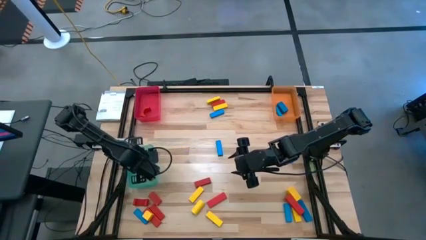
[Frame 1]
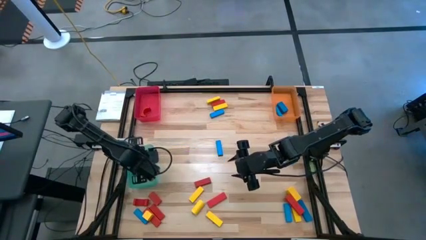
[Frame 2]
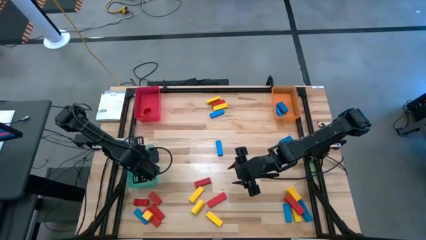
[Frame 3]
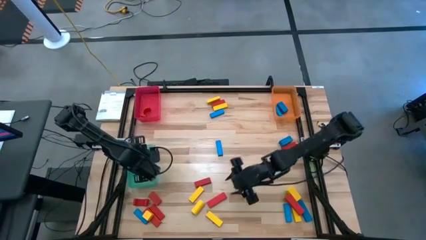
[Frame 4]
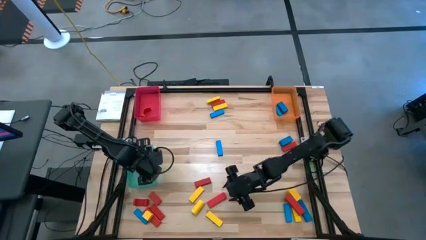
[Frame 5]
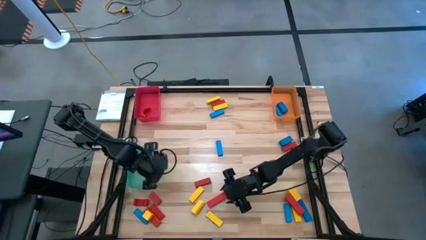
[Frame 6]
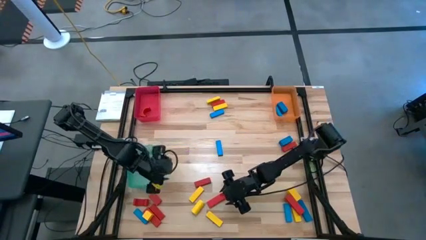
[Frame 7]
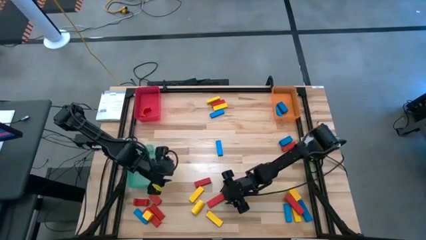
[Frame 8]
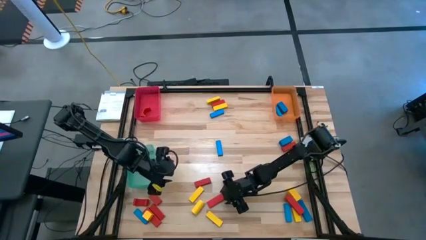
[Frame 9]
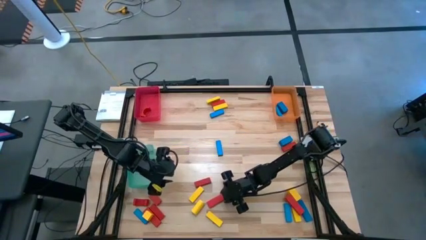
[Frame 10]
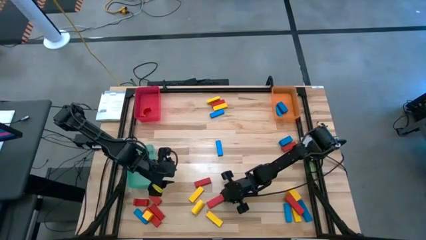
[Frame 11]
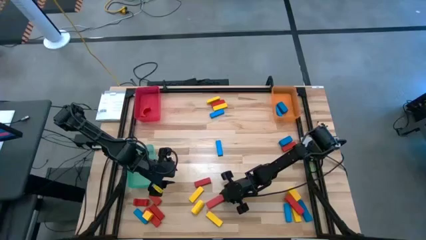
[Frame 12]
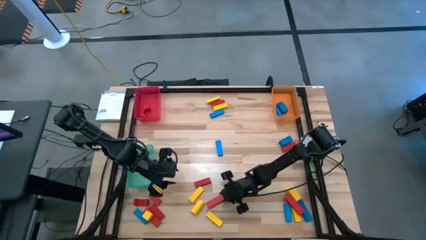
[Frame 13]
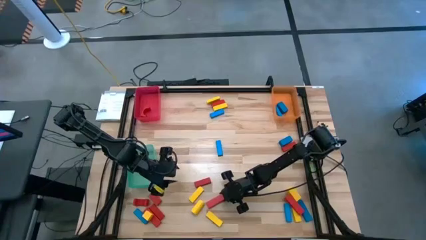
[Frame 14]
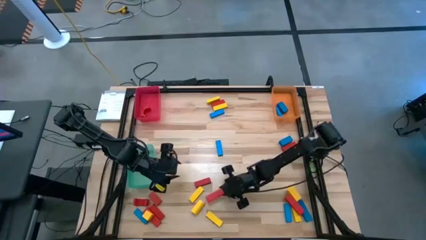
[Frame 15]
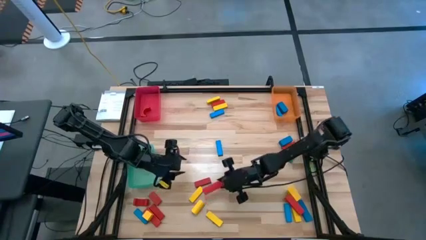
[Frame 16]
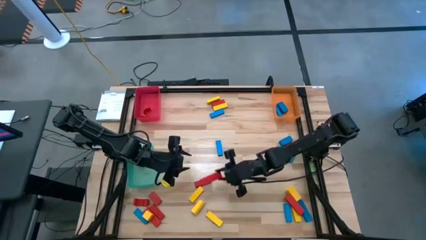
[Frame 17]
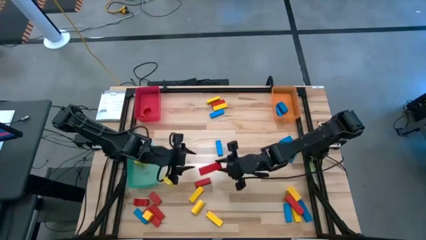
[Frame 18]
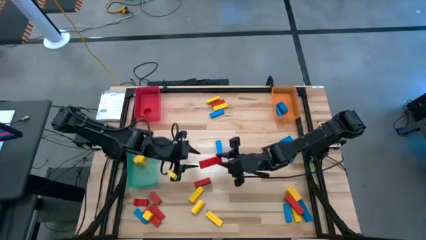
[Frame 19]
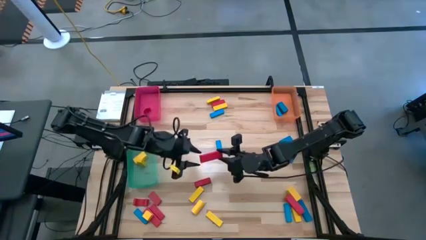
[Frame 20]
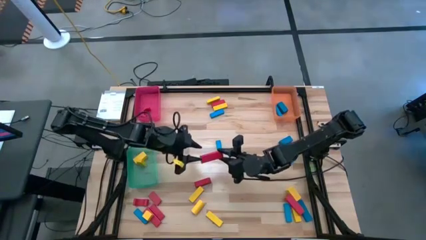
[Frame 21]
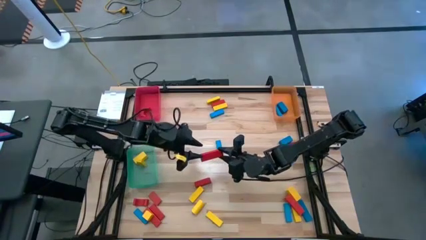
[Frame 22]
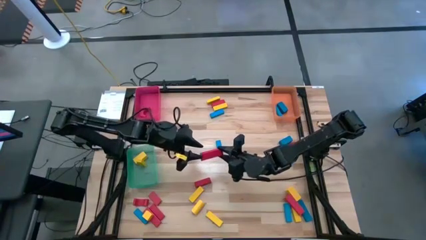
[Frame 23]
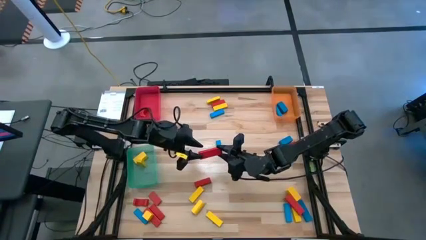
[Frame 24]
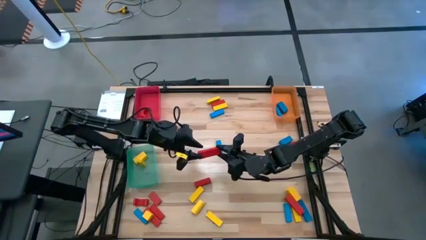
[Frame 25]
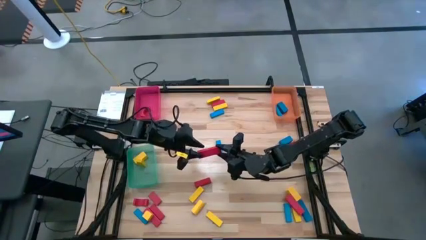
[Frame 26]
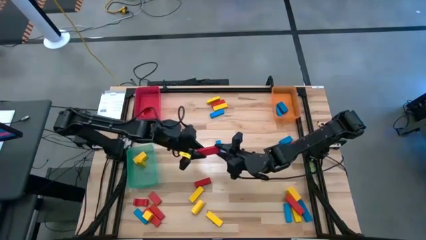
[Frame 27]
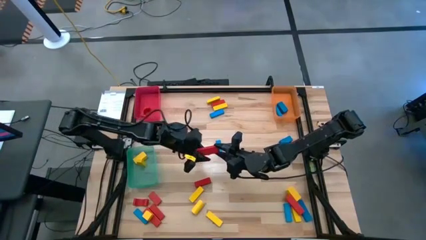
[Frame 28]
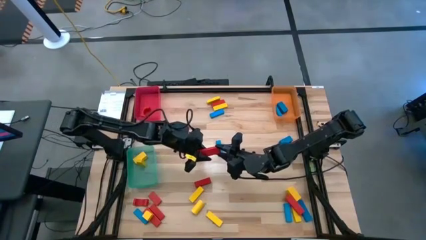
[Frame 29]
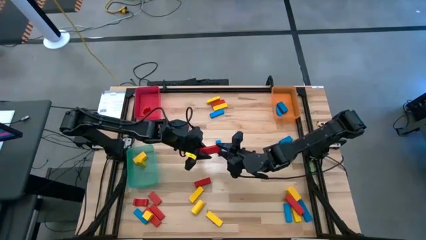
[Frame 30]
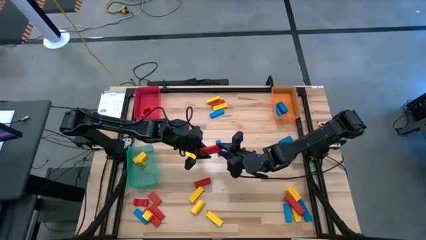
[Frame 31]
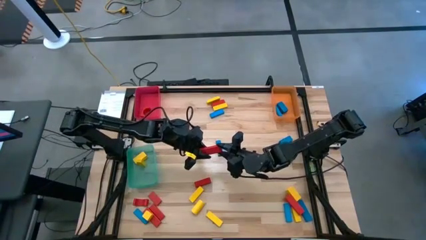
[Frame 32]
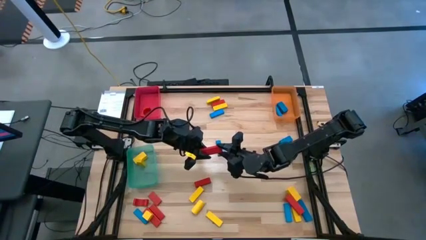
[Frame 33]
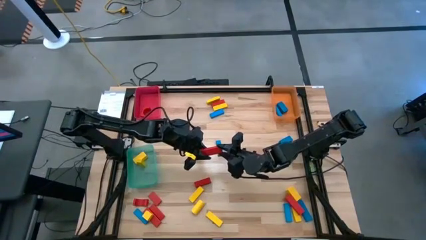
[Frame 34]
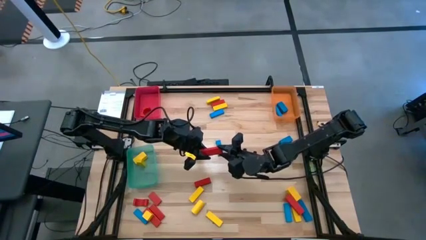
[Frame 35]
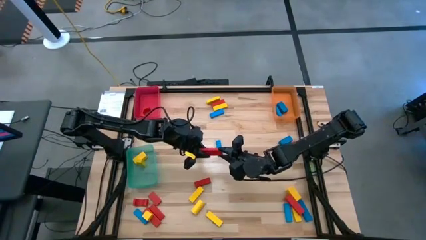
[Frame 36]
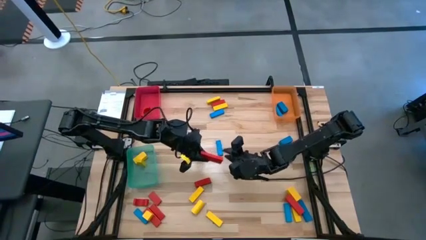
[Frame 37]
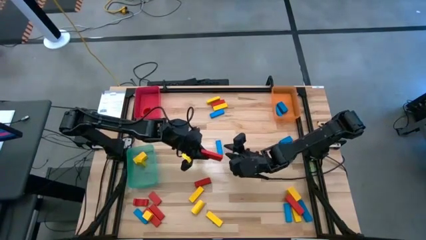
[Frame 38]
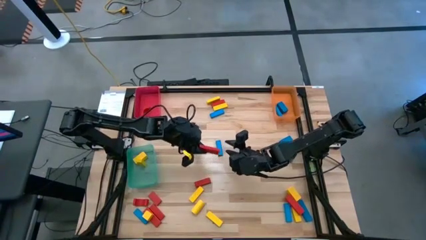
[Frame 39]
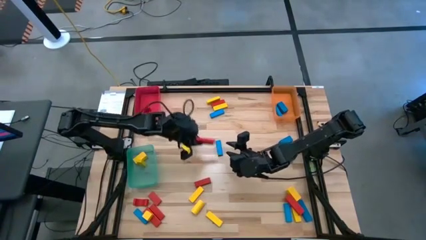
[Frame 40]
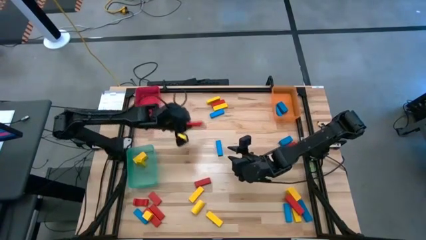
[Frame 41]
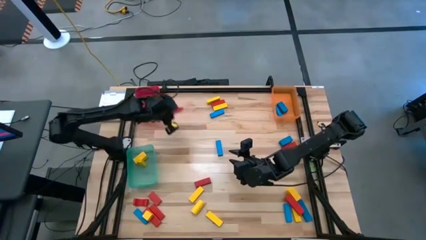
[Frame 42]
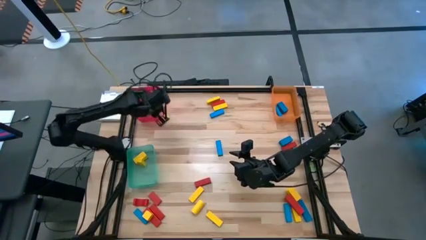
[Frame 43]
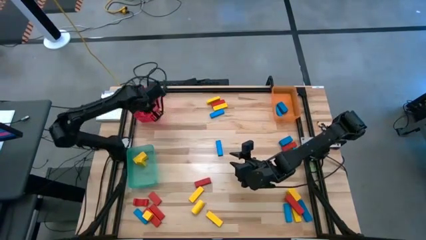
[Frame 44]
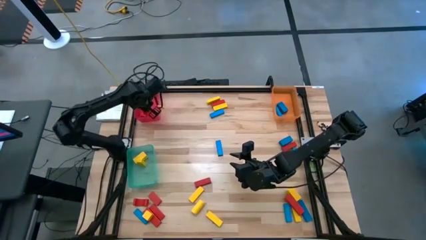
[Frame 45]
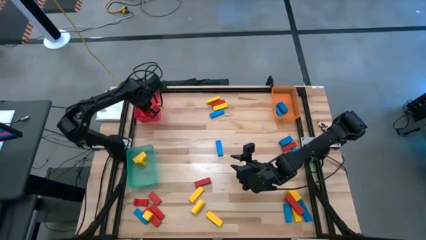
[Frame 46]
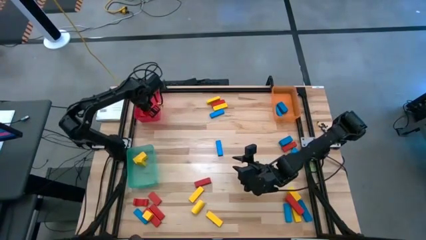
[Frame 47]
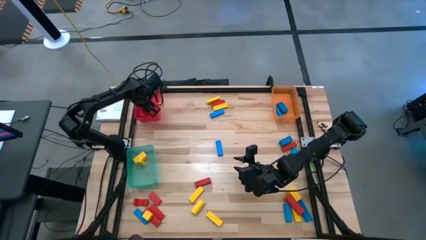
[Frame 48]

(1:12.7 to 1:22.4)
Task: Sort blocks
Put the red block into the red bin
